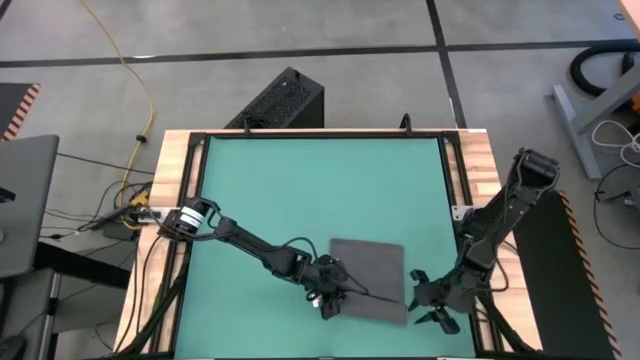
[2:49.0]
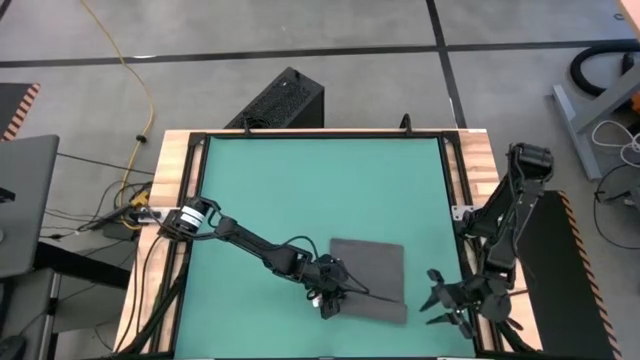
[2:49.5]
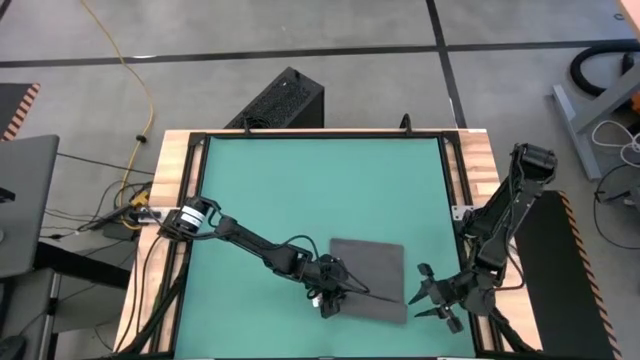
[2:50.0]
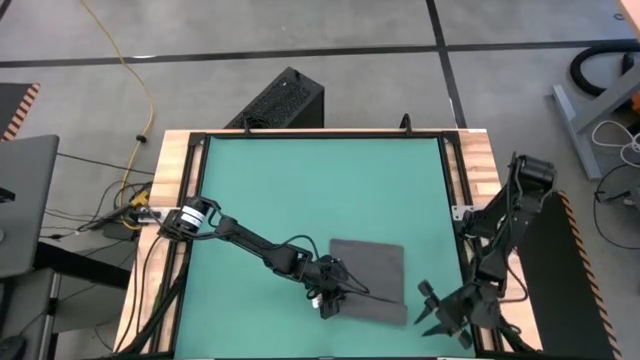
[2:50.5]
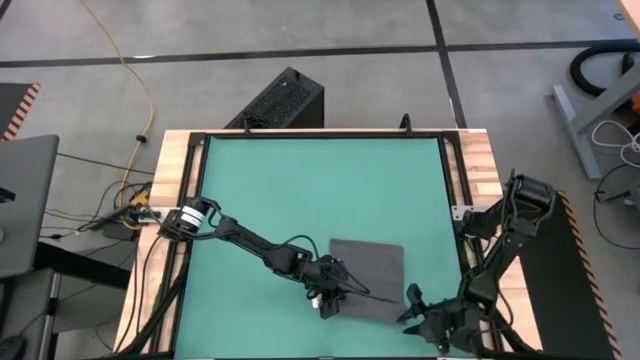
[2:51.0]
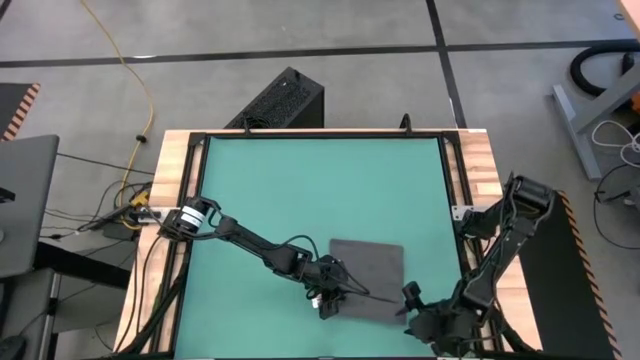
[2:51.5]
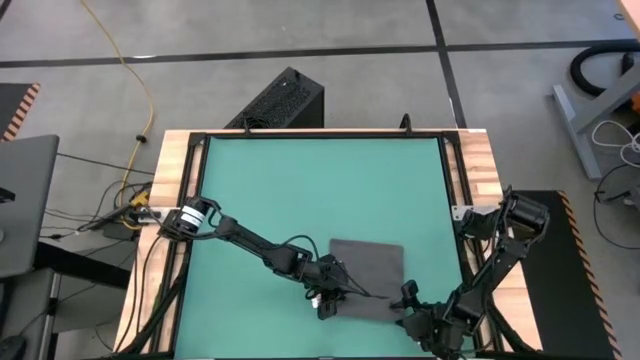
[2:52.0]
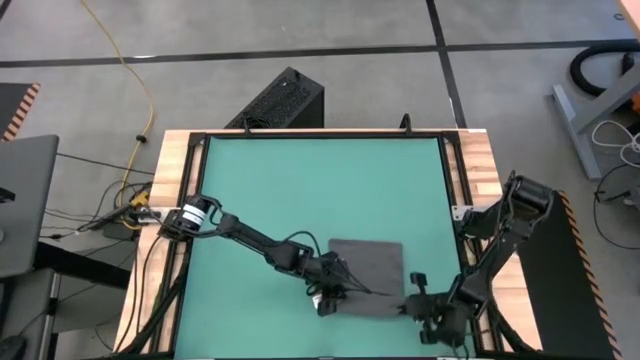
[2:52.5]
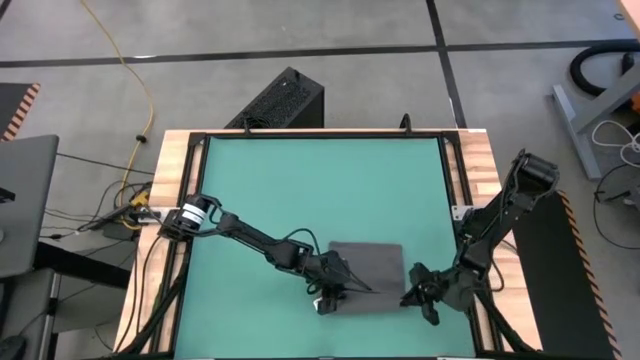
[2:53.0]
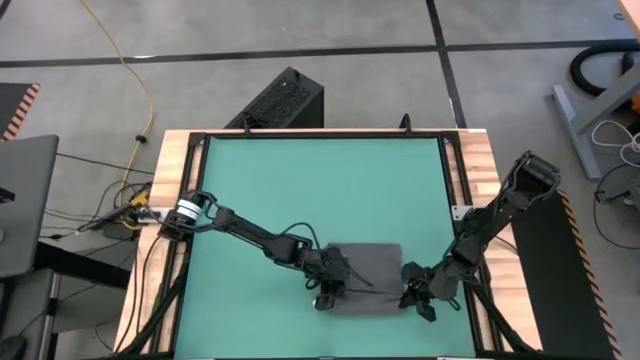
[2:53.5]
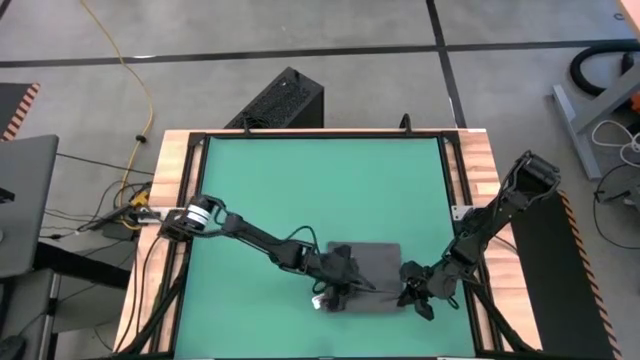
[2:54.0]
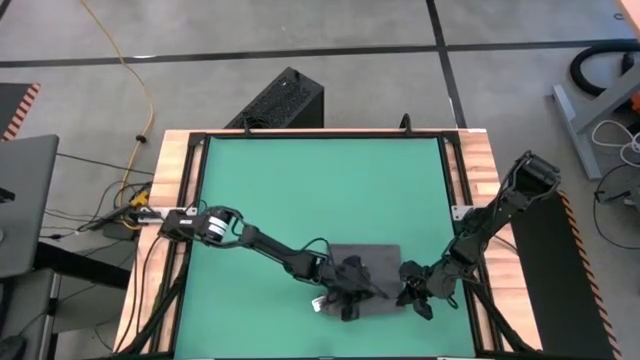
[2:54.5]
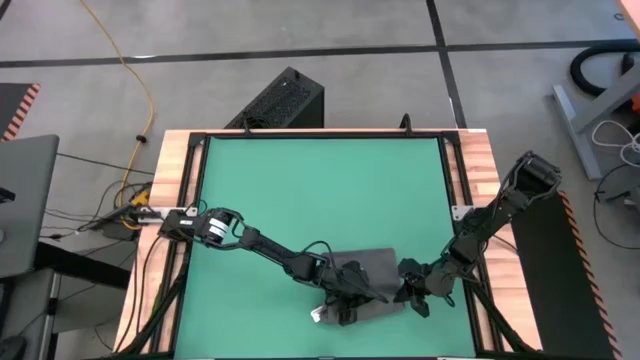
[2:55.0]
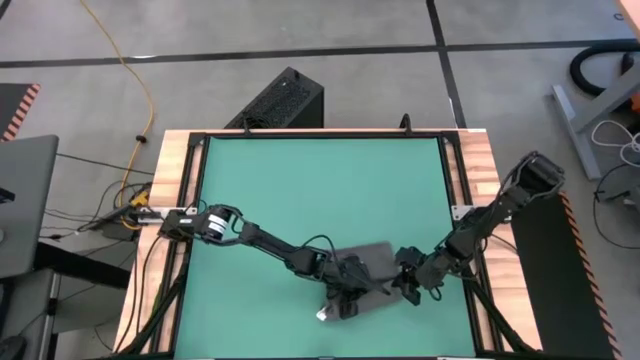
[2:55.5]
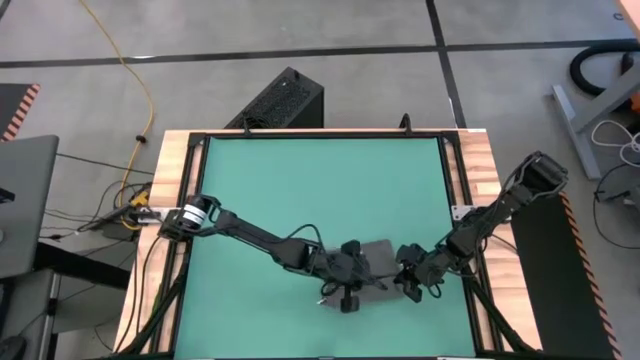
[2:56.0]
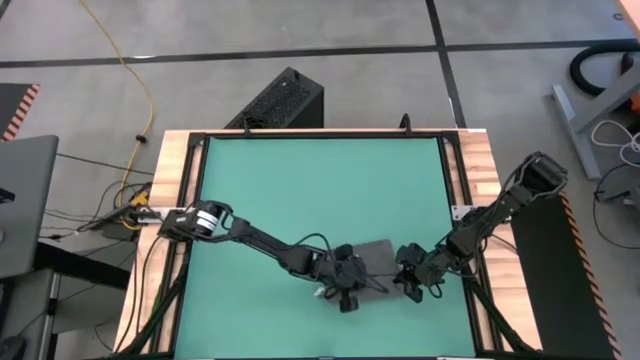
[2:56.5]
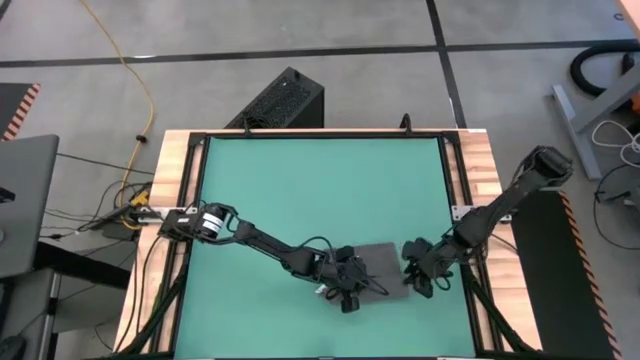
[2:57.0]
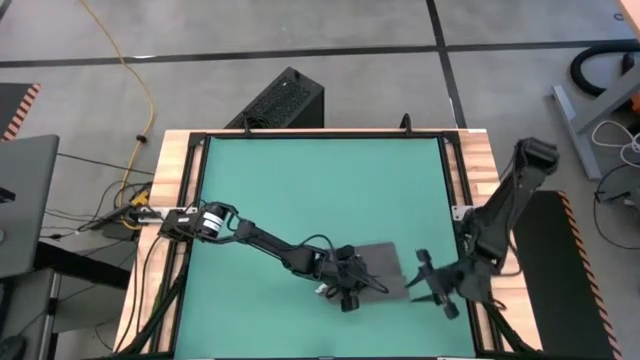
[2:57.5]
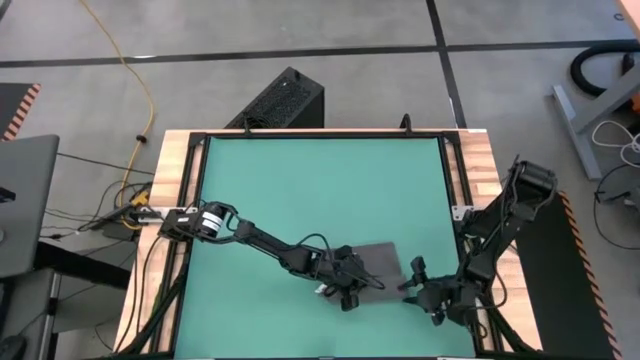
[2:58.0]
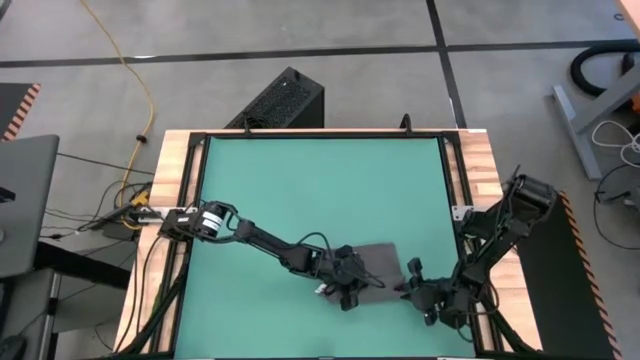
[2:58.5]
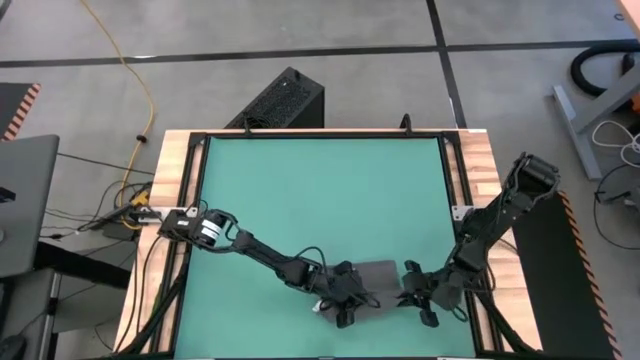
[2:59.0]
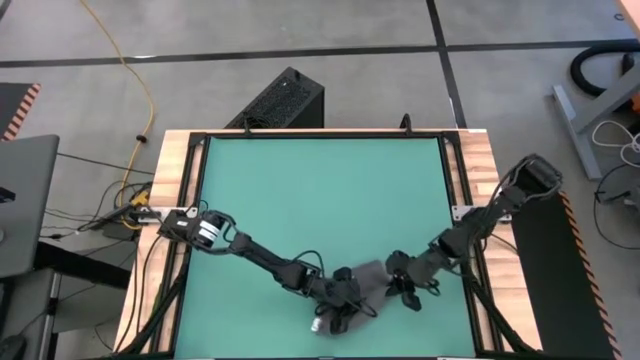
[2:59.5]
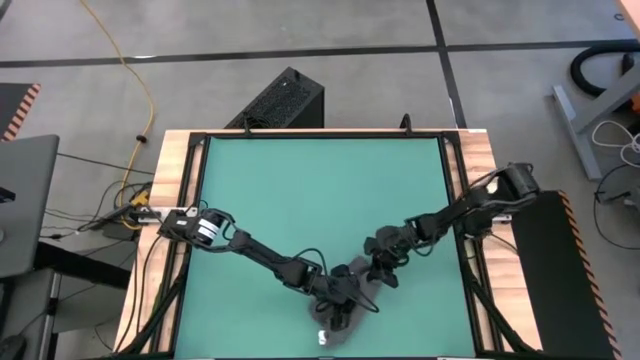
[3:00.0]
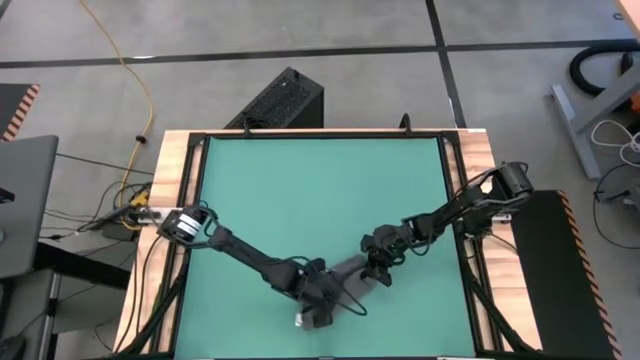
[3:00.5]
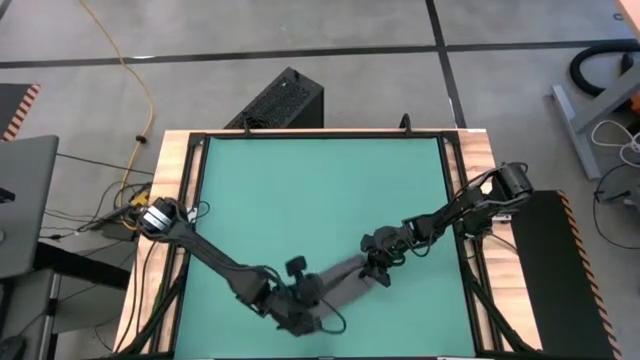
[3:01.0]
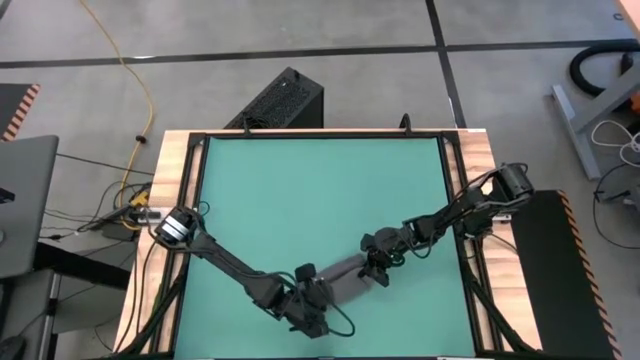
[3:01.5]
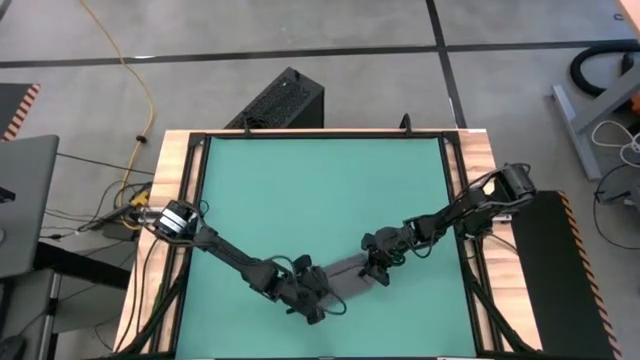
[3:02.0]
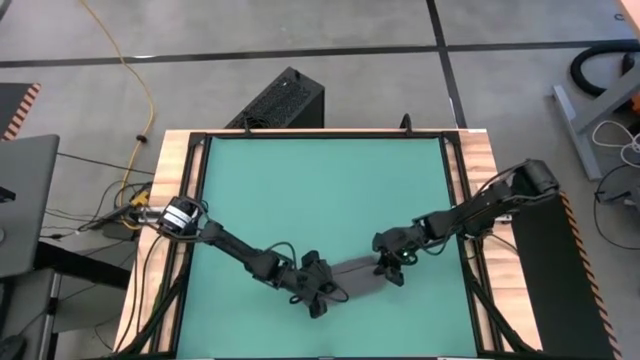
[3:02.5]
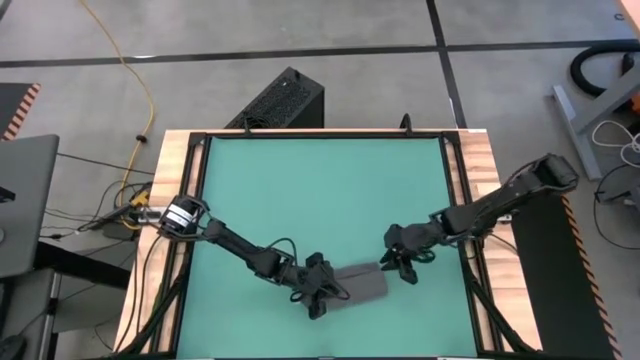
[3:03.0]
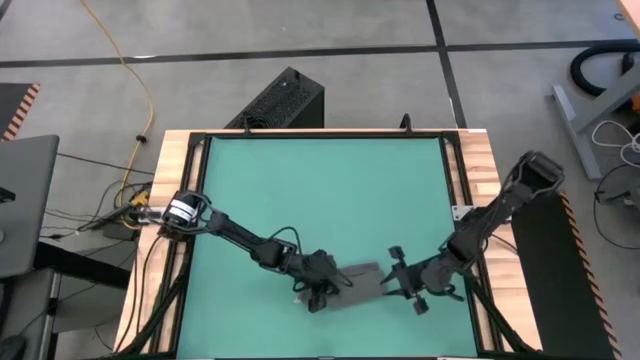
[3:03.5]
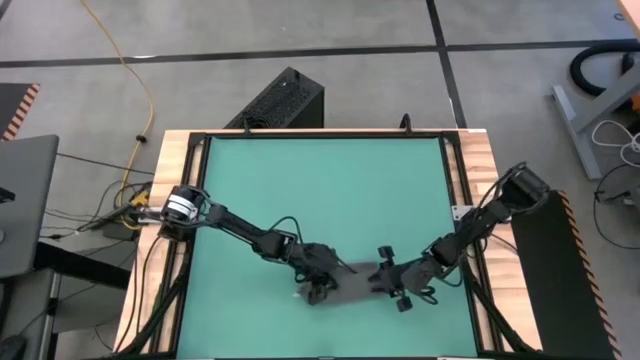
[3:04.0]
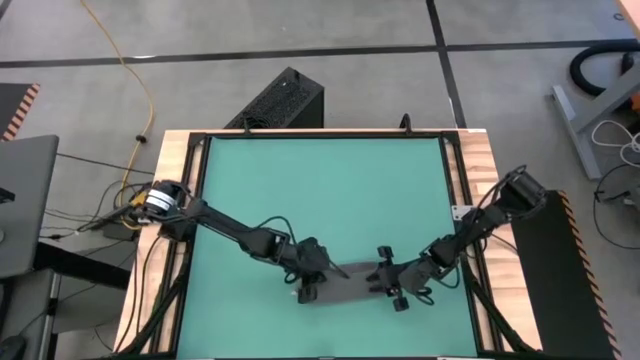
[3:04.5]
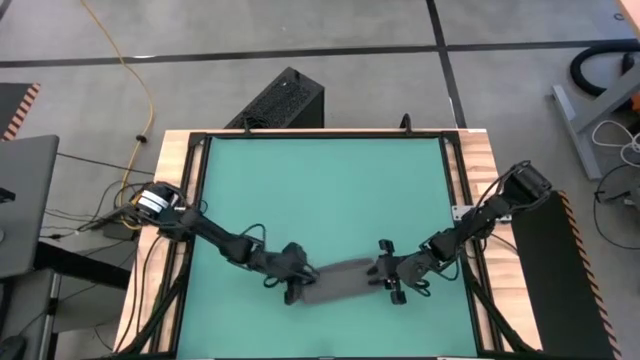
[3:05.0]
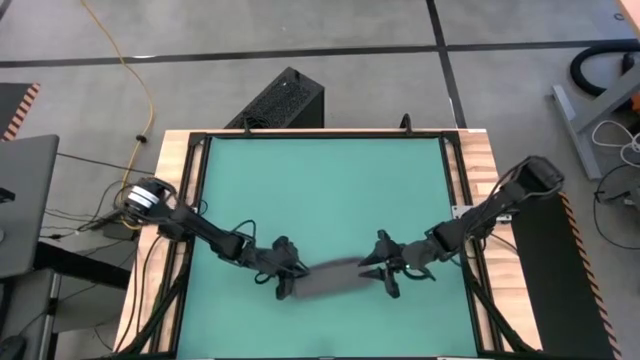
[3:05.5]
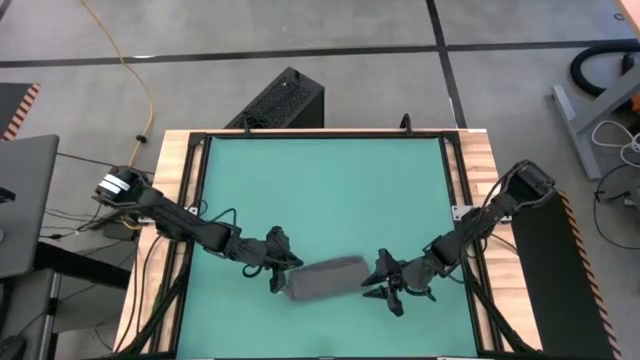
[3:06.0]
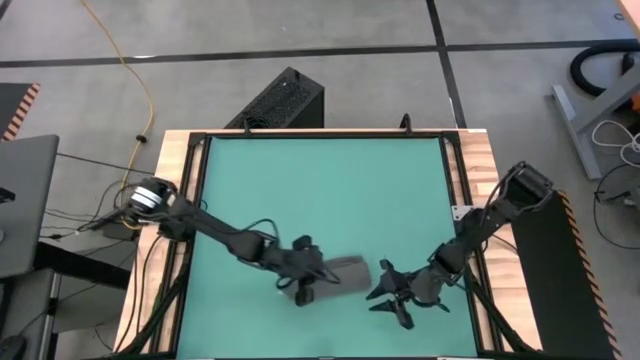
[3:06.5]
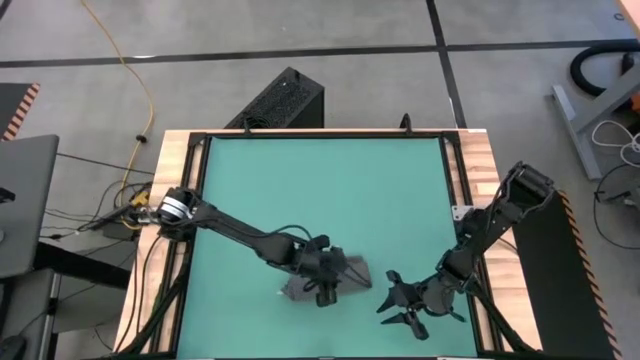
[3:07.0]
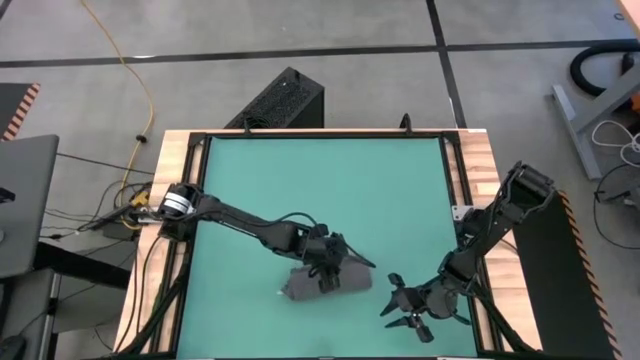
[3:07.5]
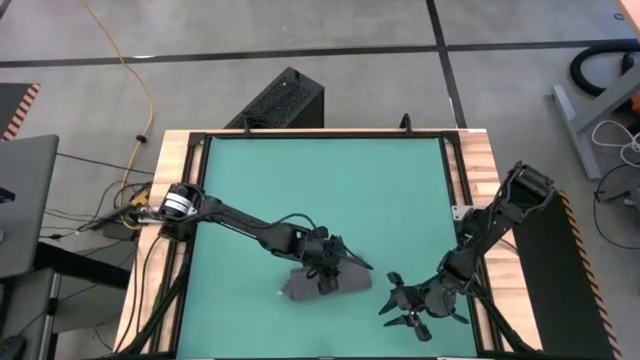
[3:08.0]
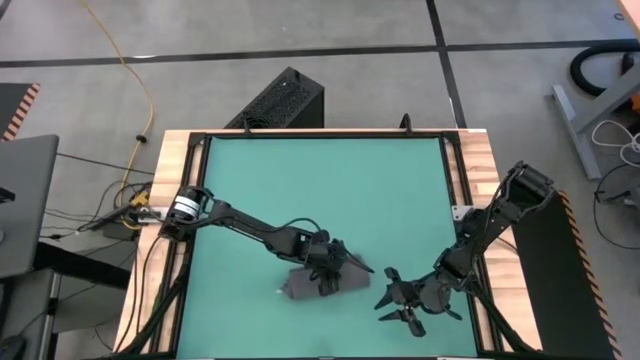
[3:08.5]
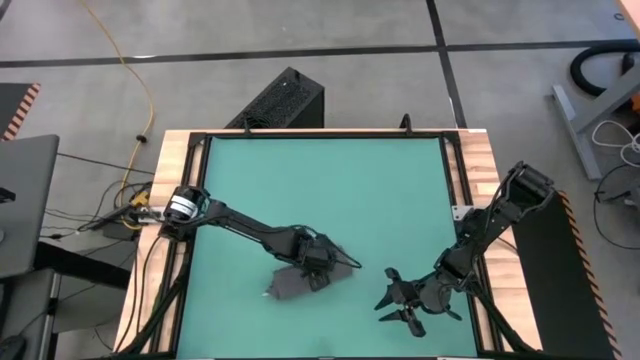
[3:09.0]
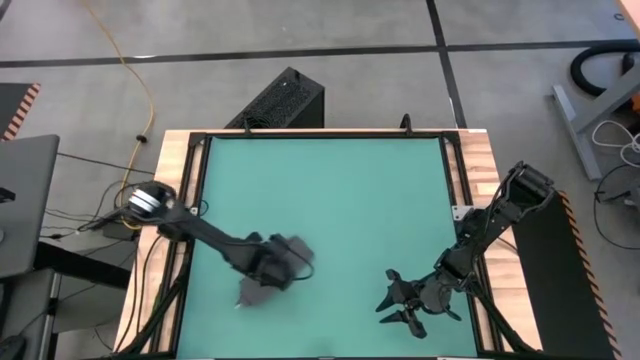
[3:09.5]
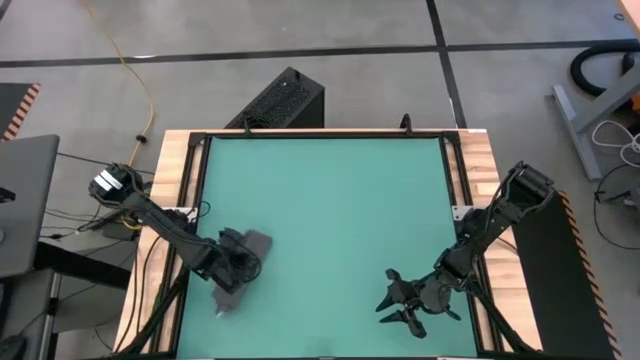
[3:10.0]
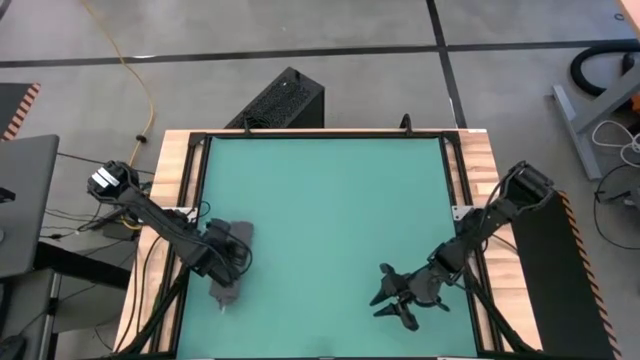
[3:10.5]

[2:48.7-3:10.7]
Task: Roll towel
Roll the gray towel
